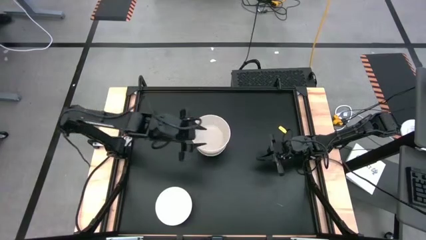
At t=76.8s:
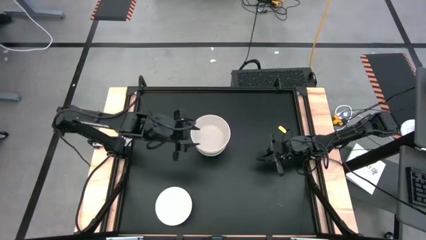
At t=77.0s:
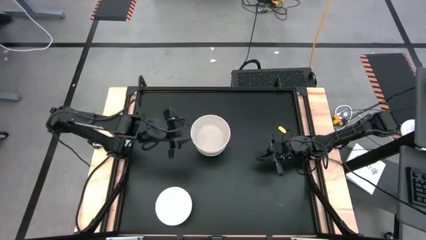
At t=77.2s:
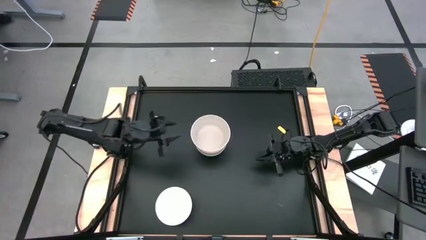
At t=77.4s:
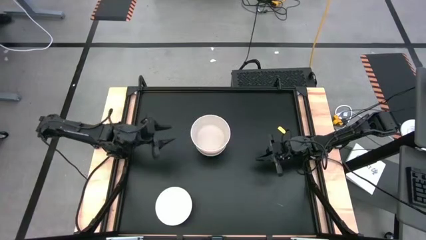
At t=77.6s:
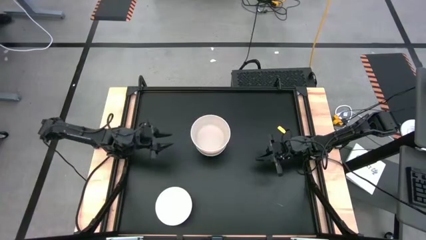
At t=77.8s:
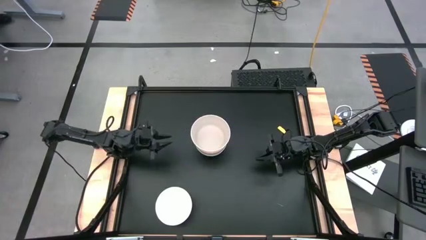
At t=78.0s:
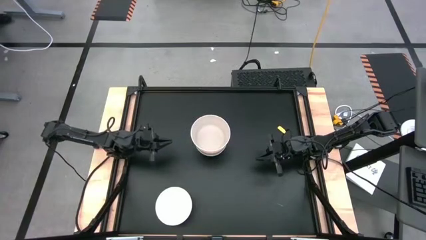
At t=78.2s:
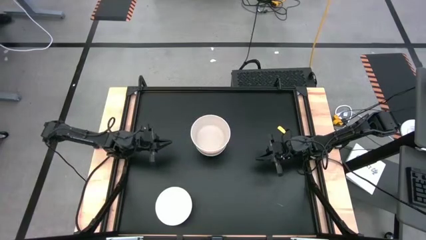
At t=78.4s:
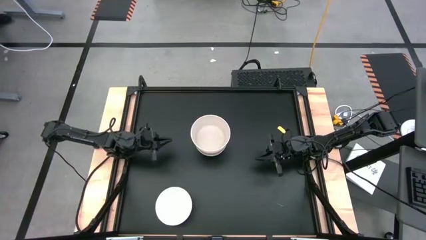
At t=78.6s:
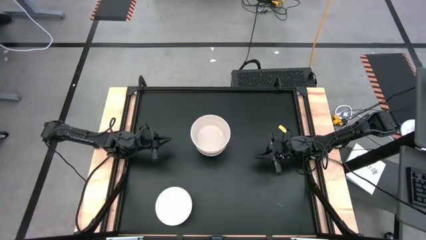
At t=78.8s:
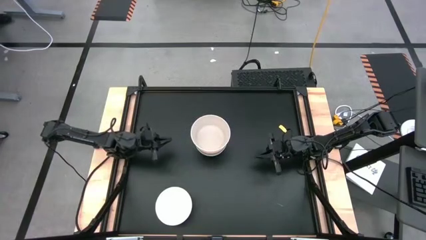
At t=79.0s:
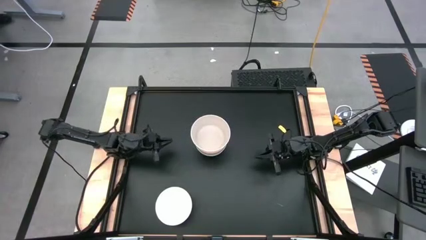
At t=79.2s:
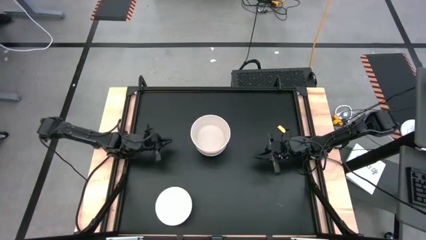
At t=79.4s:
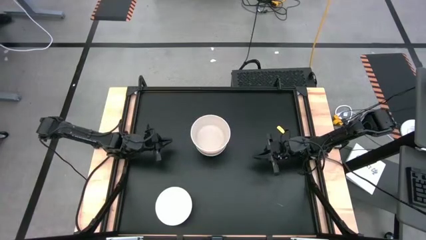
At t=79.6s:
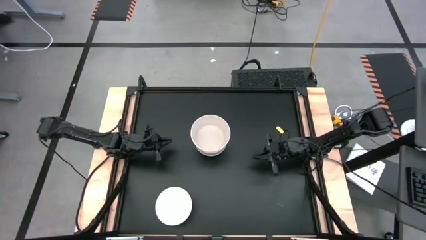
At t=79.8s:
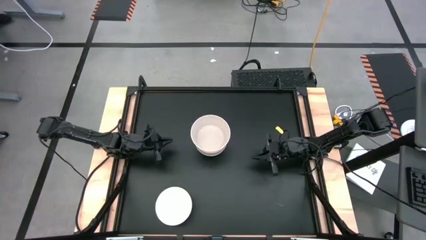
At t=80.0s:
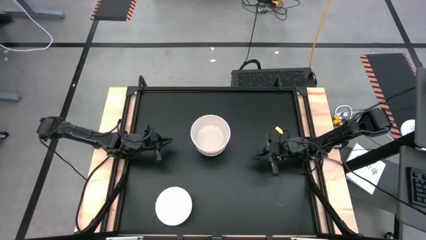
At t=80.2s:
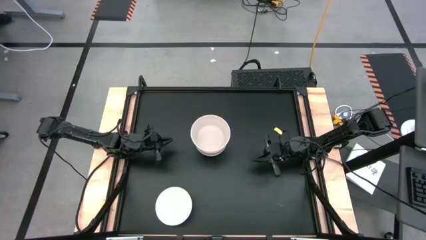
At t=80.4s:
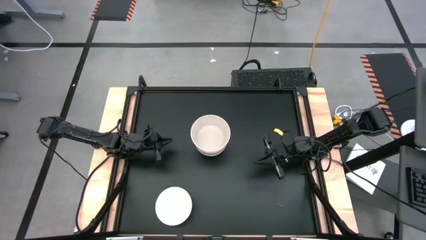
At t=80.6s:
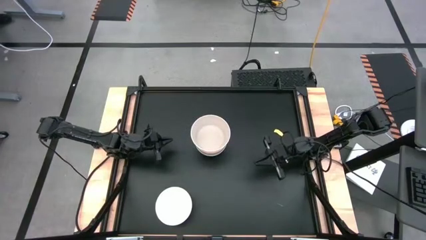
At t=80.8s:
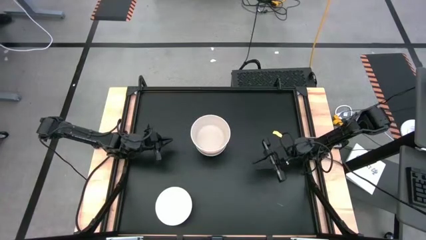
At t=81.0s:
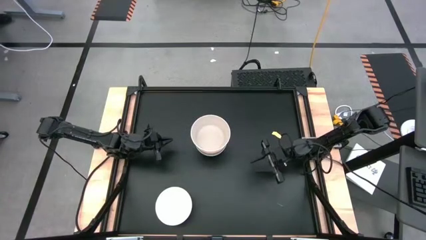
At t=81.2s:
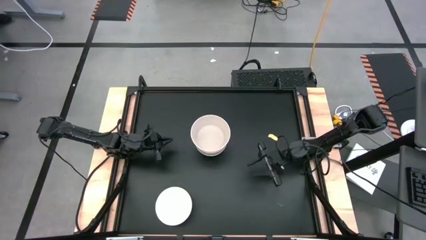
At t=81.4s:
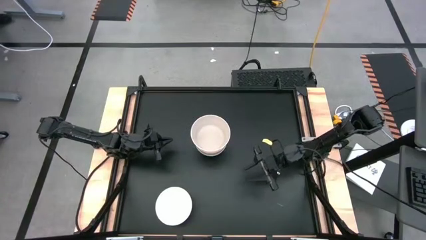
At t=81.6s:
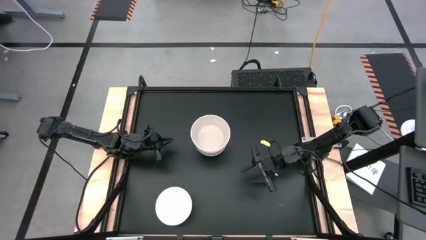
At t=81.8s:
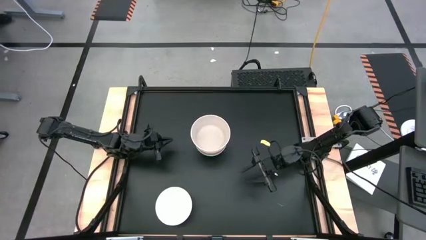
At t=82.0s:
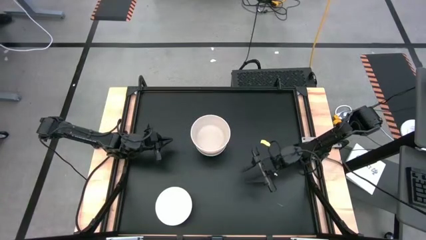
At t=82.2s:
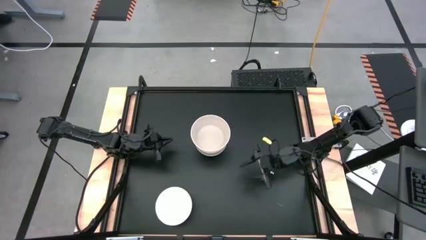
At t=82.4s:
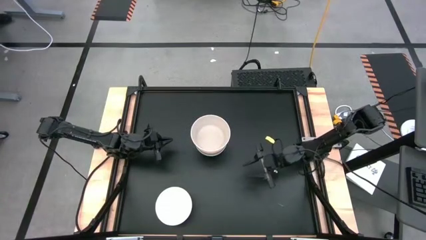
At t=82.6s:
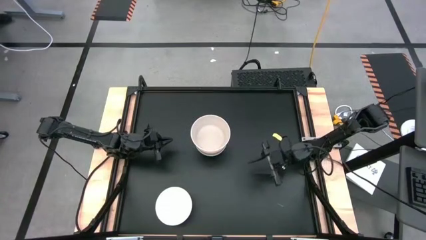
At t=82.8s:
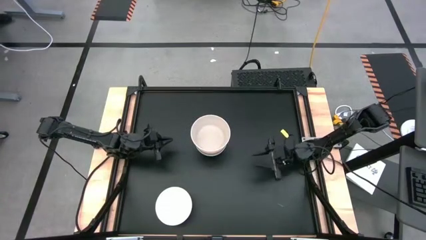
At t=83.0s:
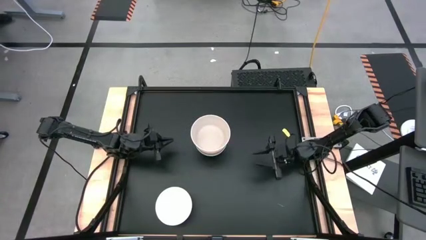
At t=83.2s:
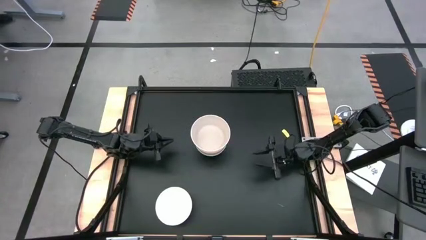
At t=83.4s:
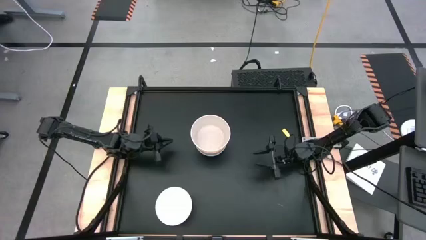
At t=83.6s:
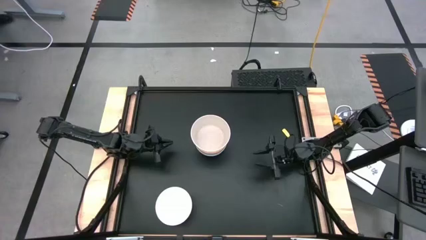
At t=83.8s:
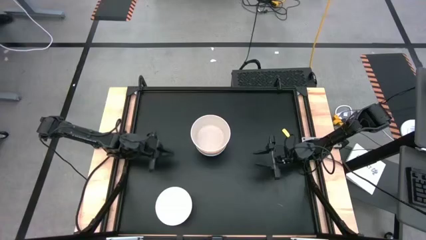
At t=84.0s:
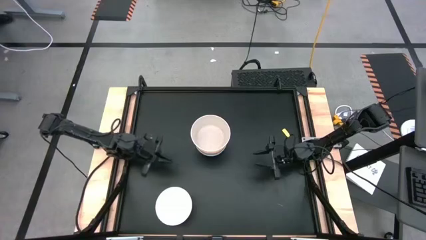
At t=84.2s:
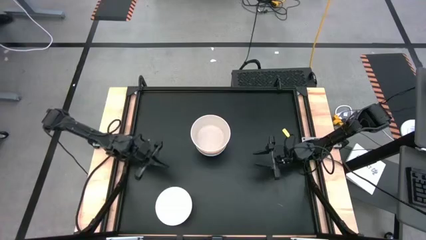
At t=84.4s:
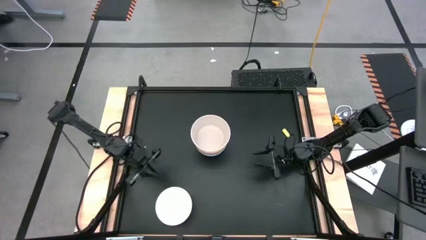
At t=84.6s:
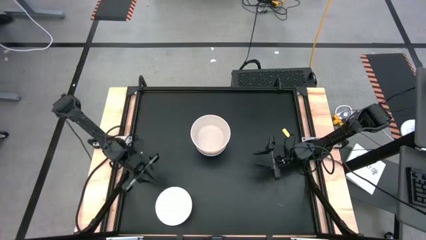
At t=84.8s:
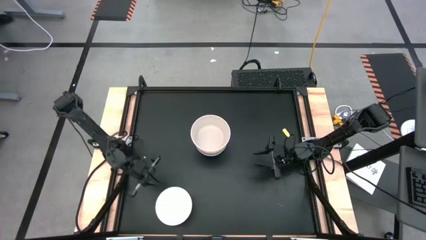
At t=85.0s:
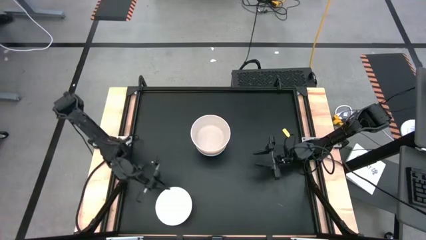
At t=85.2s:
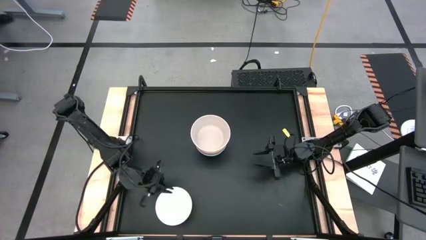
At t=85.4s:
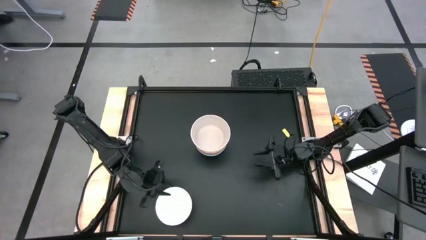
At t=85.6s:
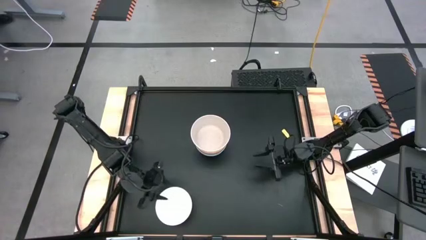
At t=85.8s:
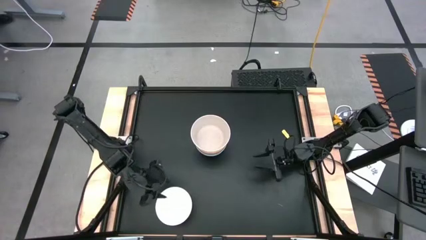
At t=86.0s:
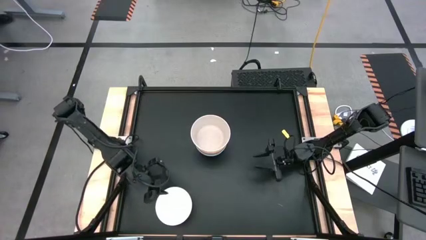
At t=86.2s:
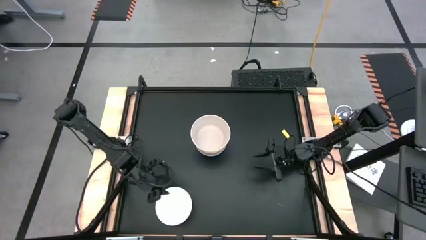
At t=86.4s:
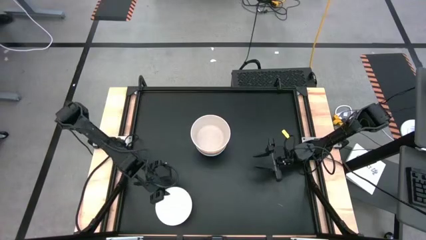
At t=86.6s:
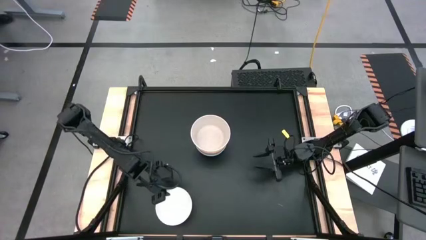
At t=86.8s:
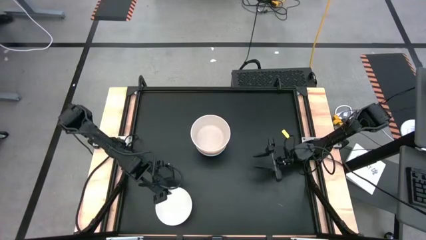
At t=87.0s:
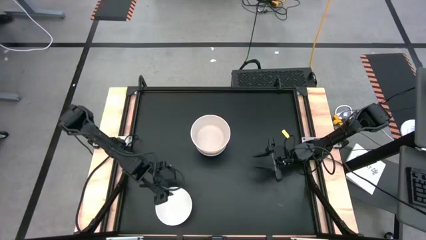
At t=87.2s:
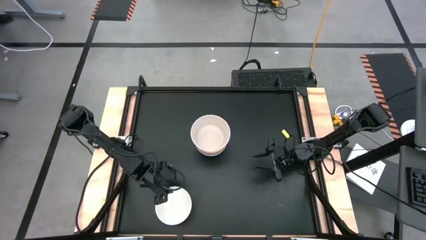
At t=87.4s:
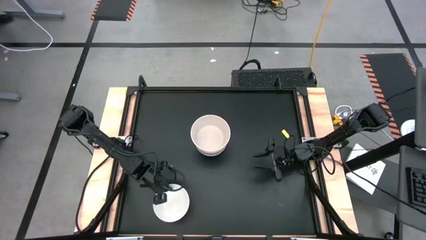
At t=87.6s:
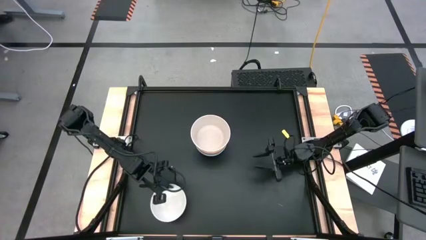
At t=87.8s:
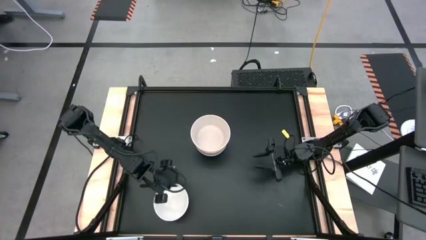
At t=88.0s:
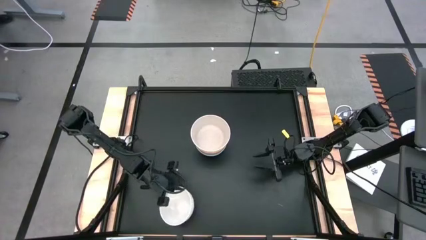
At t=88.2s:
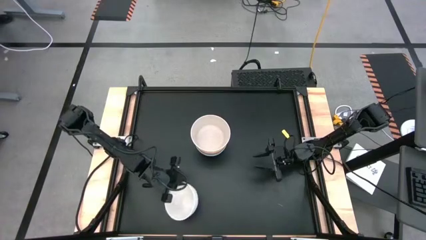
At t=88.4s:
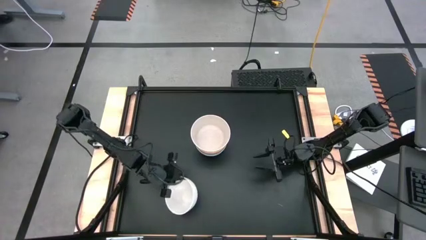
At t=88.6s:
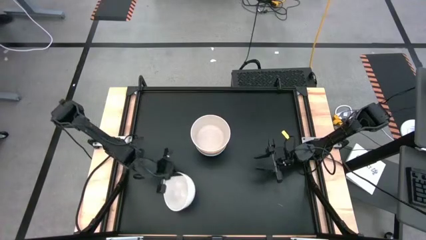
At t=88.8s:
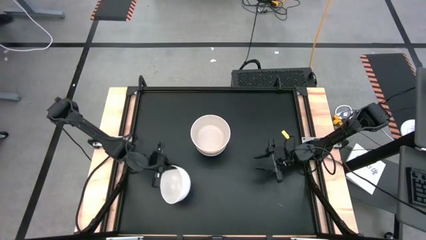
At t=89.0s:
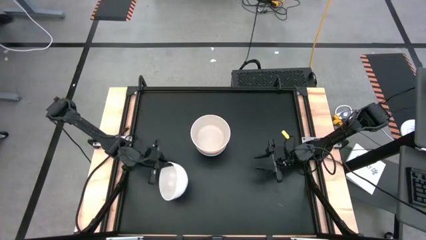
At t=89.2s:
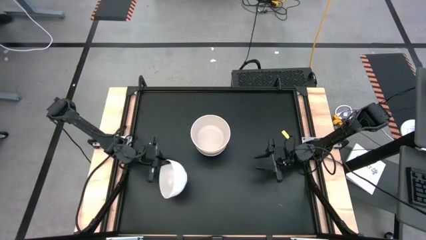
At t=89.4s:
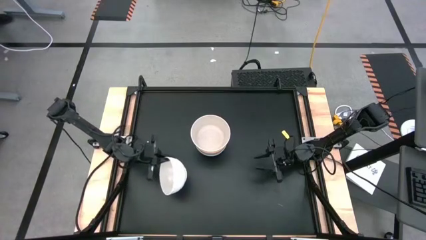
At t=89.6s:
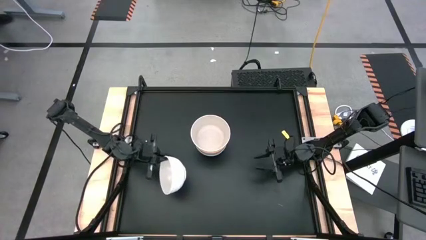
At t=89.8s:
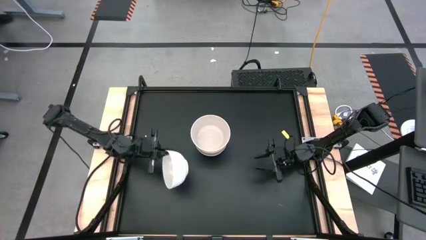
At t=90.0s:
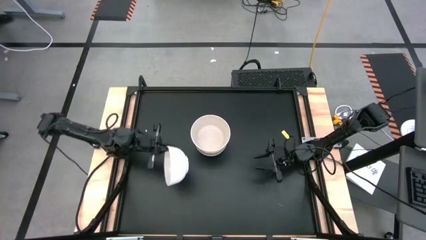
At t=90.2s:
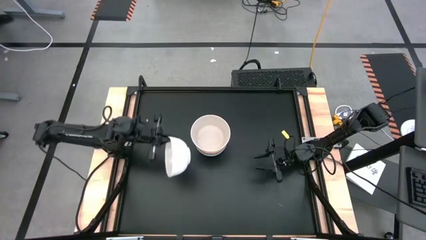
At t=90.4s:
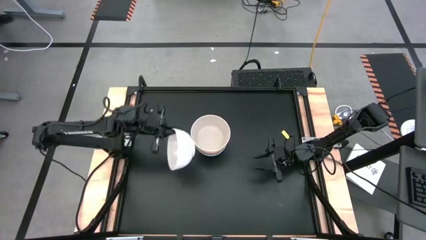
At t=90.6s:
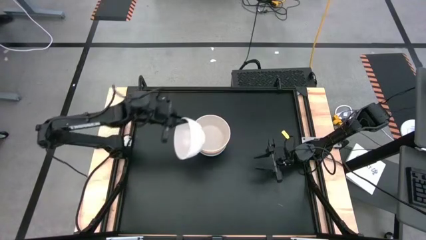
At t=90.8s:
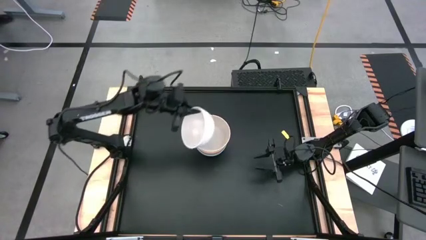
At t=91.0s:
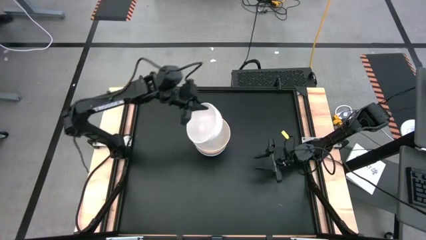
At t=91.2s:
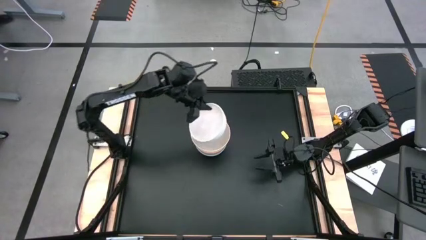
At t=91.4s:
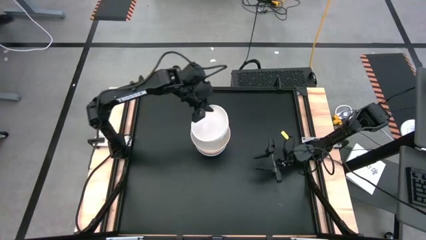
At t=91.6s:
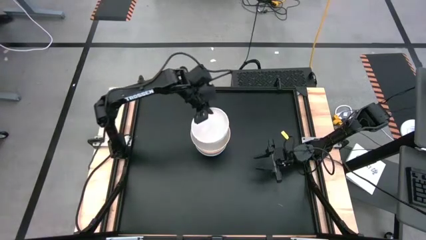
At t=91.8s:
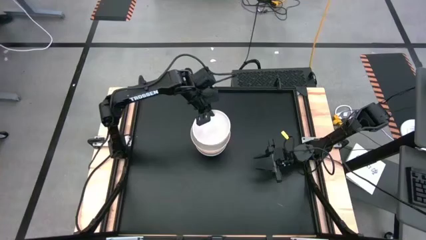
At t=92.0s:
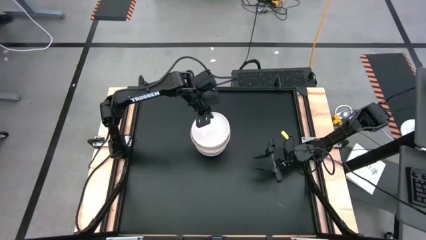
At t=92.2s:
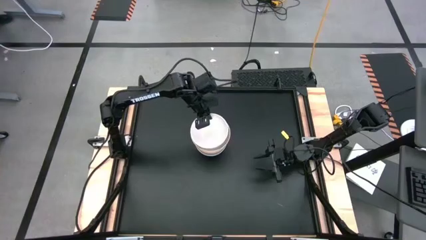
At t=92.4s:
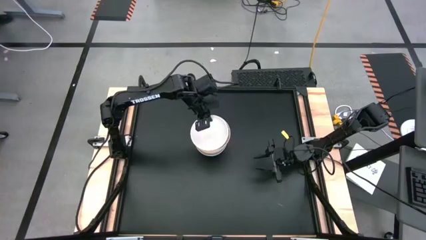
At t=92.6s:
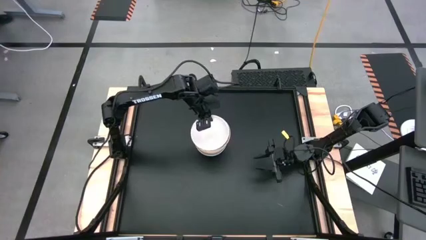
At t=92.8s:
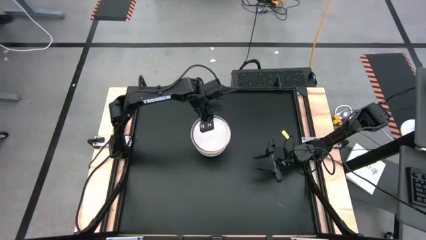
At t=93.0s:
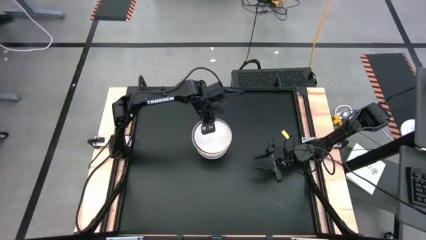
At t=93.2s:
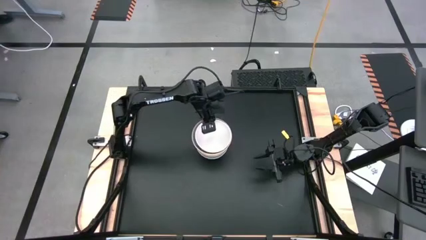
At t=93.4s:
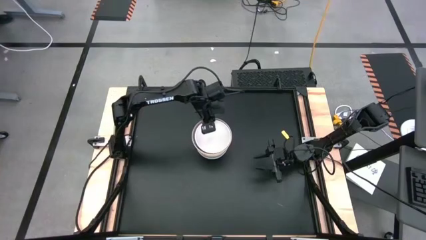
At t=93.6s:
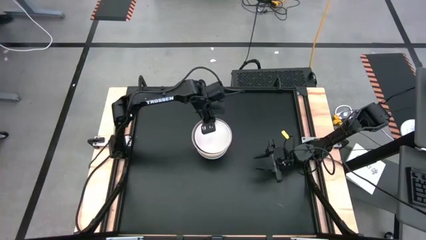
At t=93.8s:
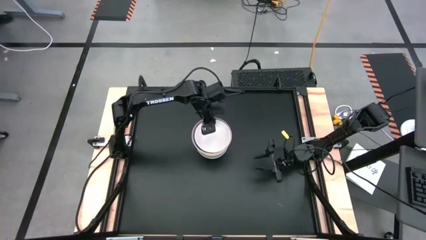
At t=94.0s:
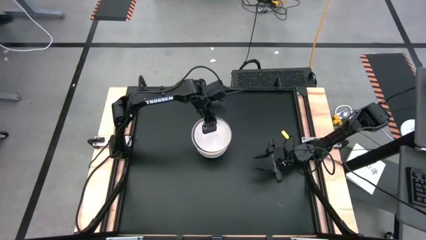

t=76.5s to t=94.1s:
Task: Nest bowls inside each other
Stack the white bowl on top of the gray bowl
